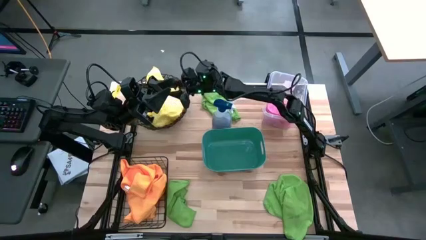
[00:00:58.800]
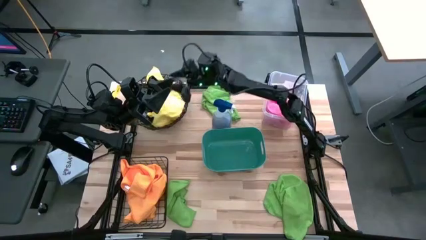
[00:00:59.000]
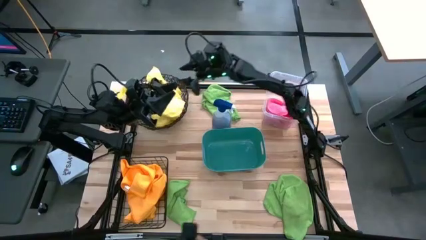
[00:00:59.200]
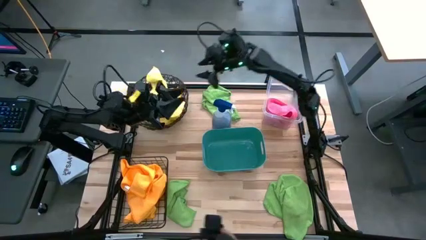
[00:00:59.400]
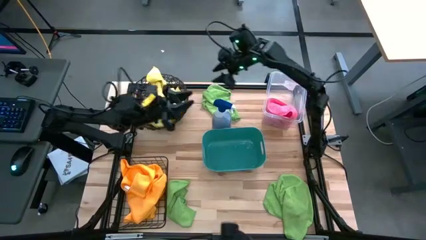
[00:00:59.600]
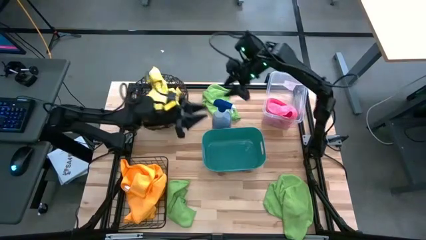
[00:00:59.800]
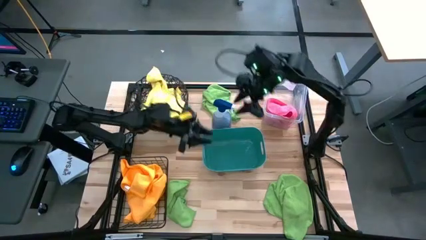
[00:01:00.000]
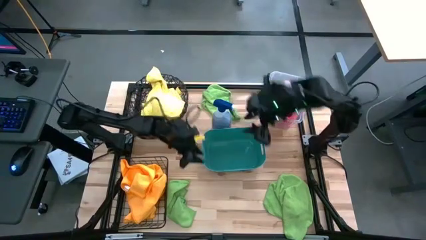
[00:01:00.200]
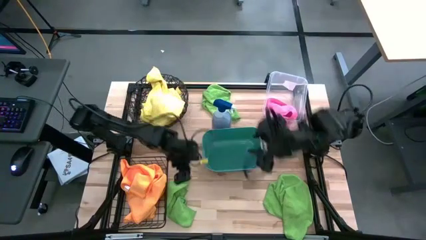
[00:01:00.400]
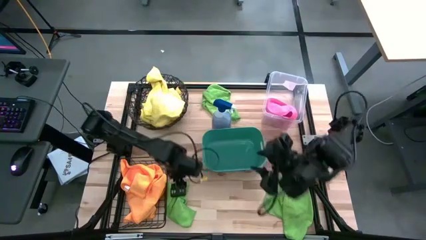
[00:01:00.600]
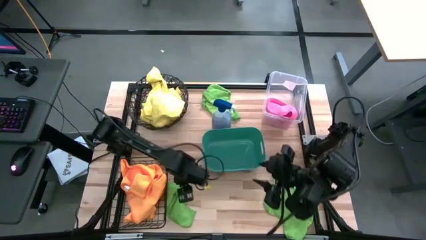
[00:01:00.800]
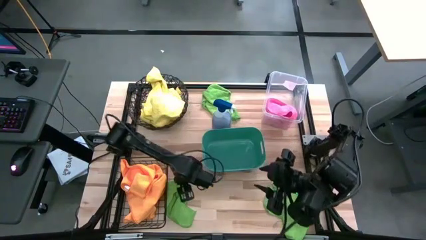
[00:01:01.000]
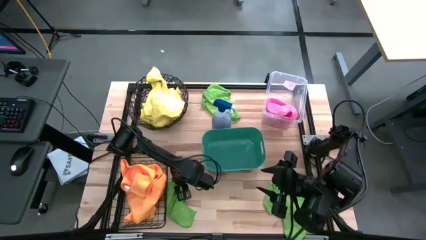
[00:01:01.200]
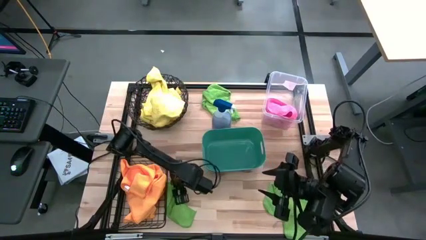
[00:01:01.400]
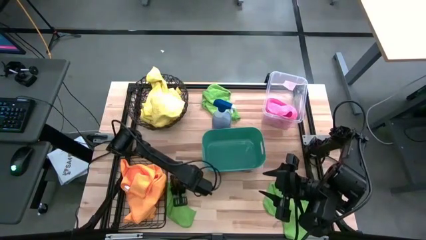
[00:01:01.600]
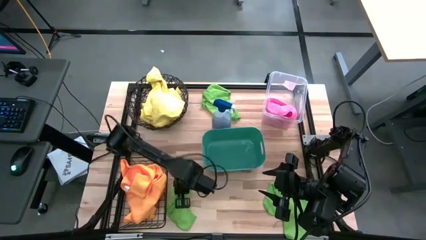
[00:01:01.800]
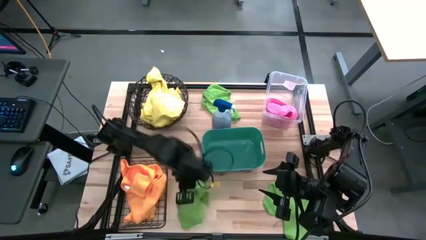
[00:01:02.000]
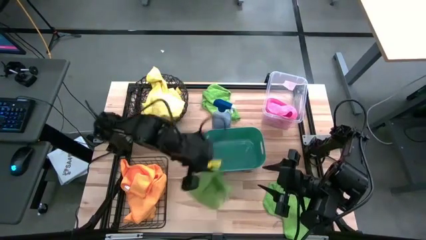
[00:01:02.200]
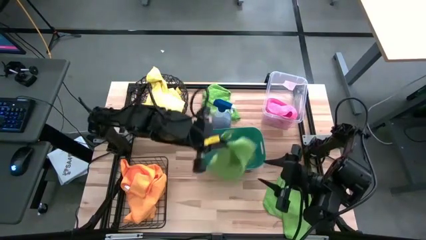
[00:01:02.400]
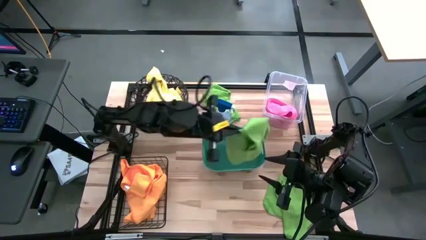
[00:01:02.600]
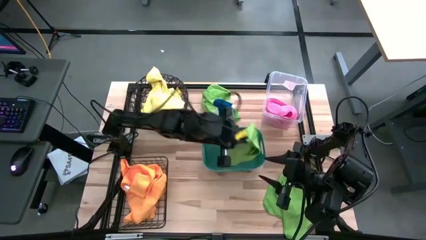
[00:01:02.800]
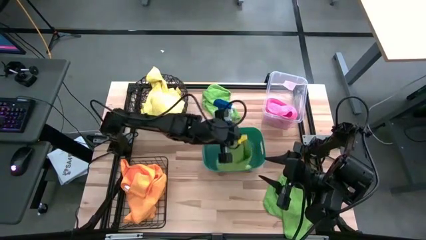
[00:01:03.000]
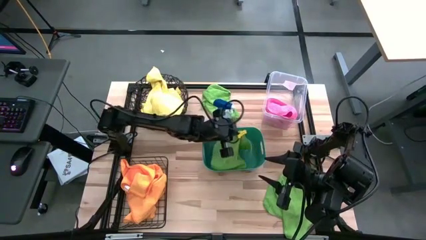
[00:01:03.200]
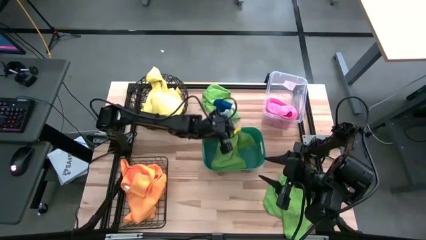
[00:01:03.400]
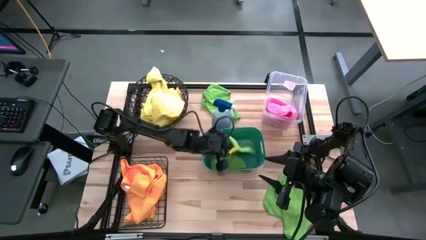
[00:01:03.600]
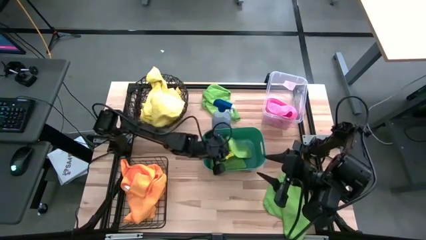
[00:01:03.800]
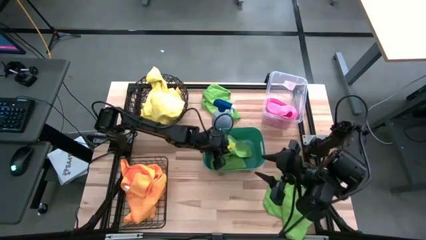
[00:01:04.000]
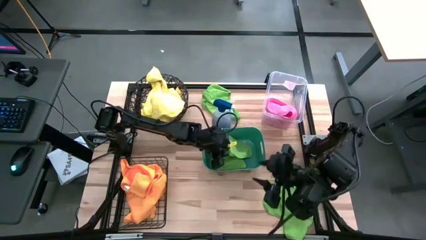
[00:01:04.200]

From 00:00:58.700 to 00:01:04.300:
Task: Sort microfiber towel by color & place in baskets
Put the bottom left green towel into the blue bin

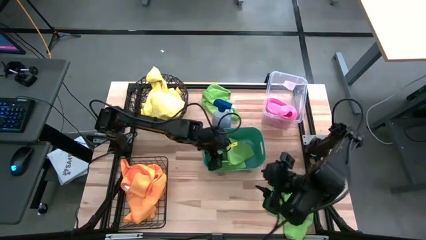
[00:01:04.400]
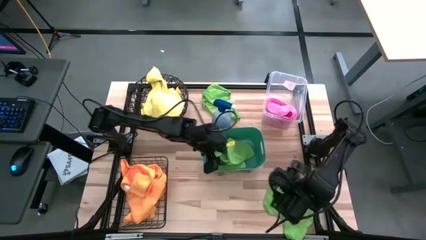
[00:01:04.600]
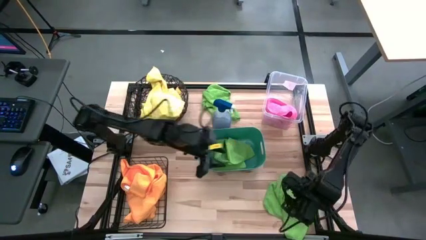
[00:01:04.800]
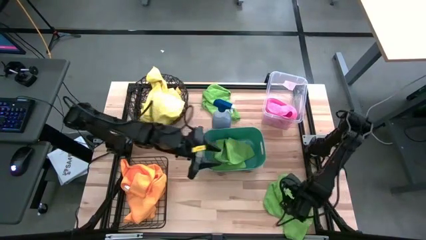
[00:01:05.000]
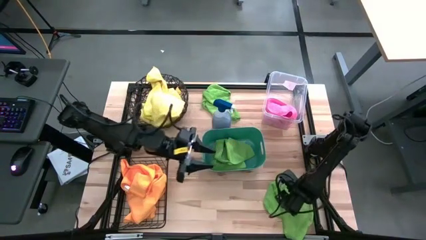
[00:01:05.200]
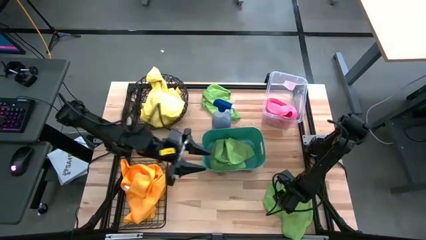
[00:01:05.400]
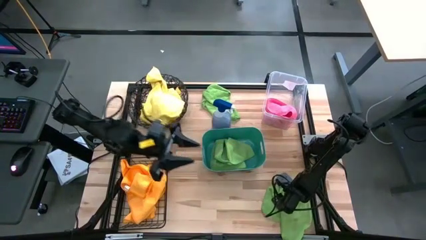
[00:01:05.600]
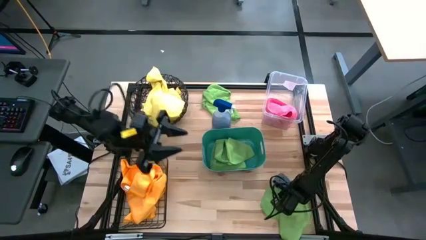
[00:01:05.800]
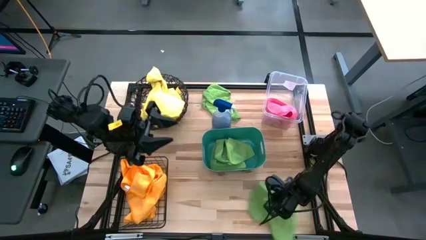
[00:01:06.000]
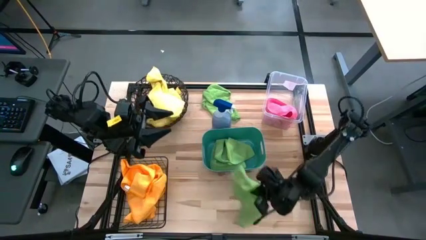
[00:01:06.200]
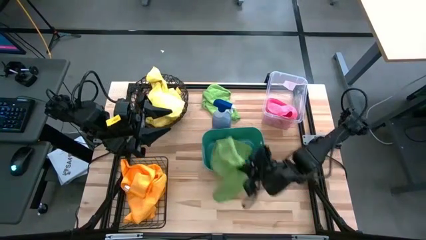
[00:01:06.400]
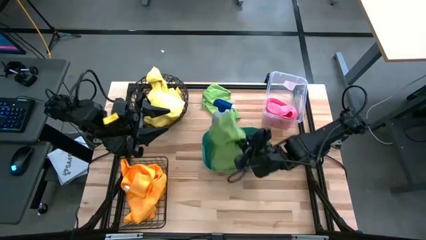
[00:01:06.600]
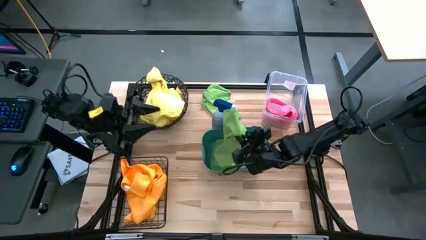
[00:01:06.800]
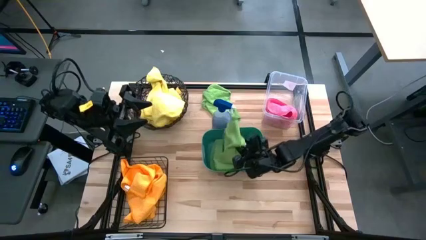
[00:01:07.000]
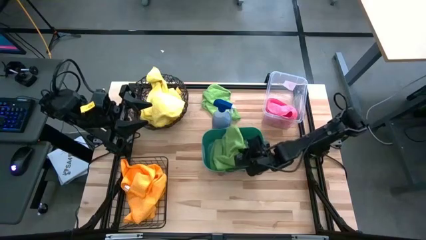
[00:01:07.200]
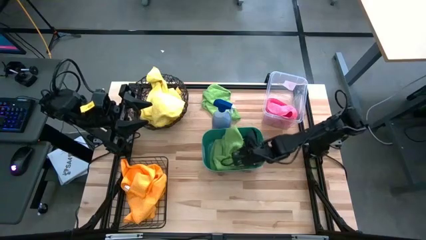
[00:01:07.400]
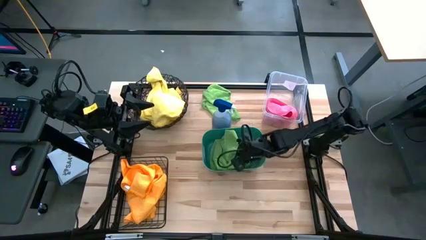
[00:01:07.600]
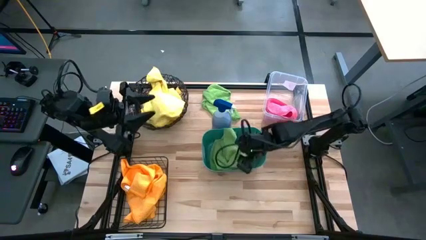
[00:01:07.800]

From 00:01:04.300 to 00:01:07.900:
Put the bottom green towel into the blue bin

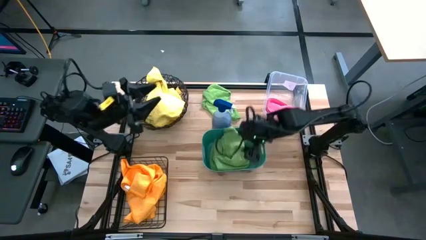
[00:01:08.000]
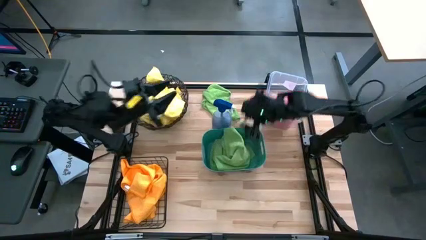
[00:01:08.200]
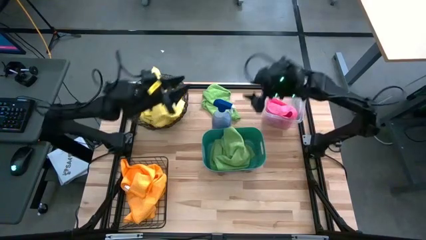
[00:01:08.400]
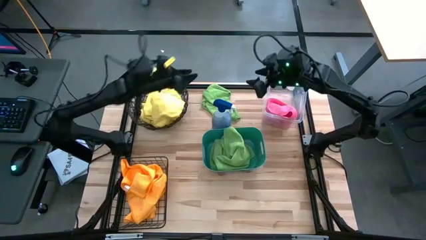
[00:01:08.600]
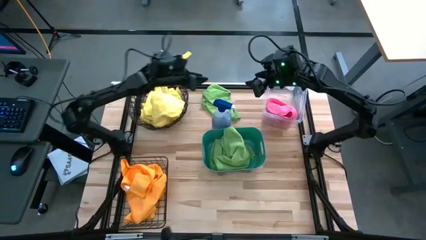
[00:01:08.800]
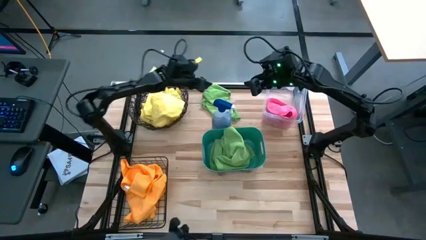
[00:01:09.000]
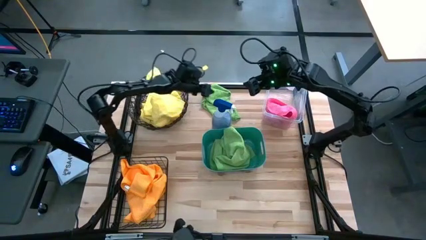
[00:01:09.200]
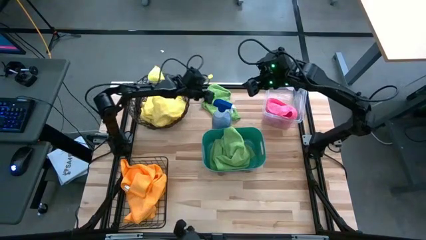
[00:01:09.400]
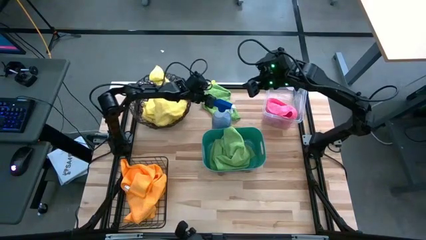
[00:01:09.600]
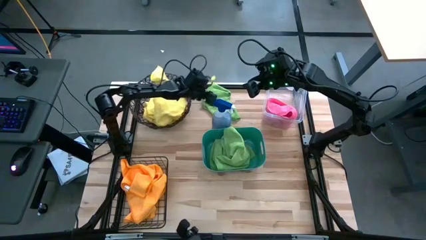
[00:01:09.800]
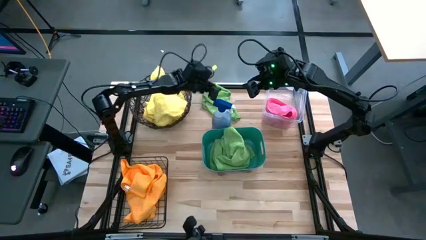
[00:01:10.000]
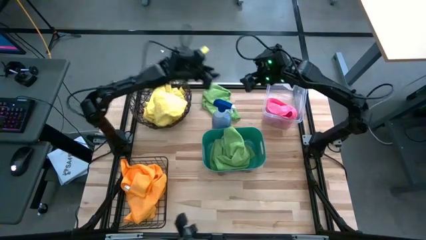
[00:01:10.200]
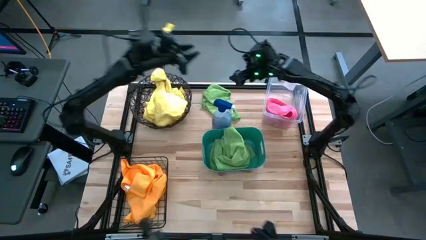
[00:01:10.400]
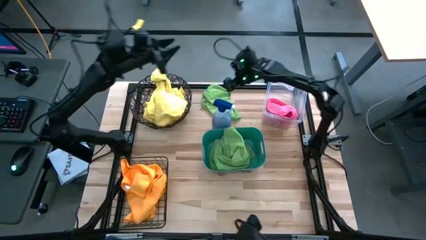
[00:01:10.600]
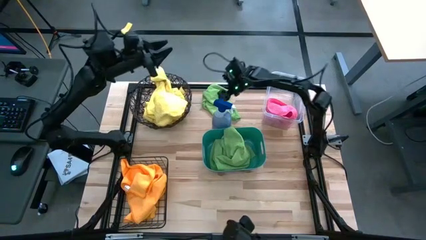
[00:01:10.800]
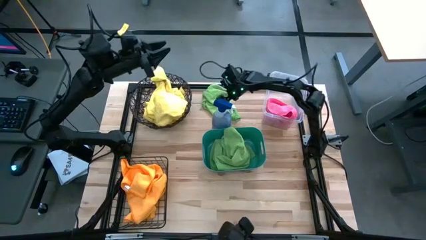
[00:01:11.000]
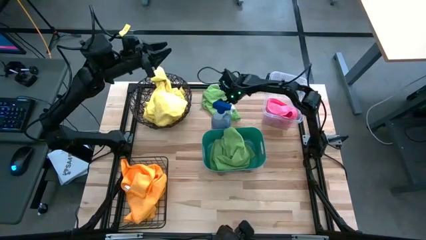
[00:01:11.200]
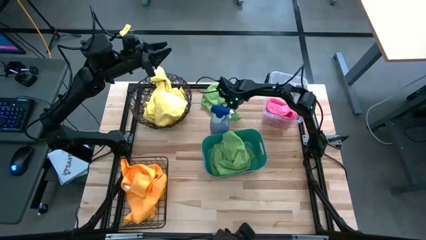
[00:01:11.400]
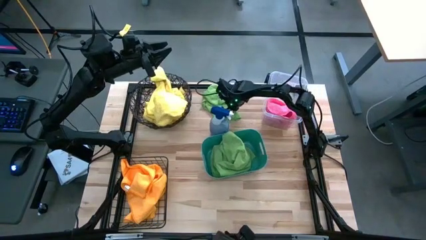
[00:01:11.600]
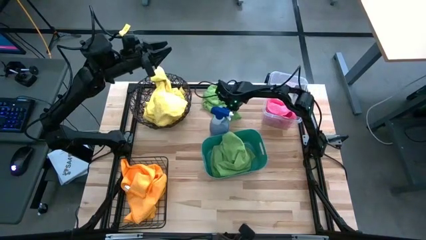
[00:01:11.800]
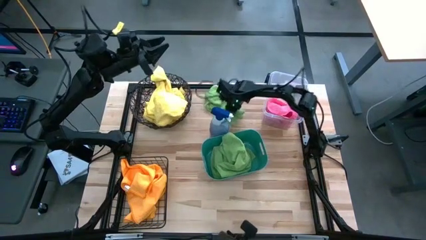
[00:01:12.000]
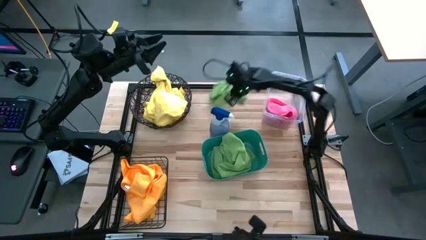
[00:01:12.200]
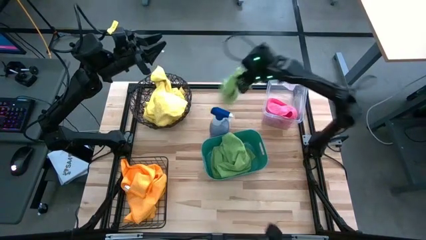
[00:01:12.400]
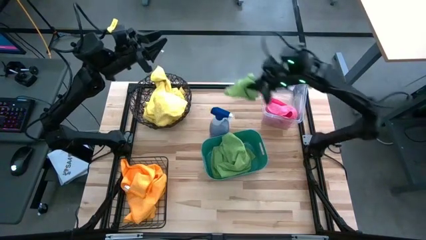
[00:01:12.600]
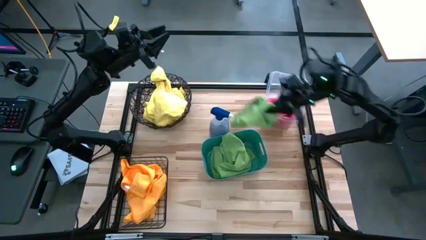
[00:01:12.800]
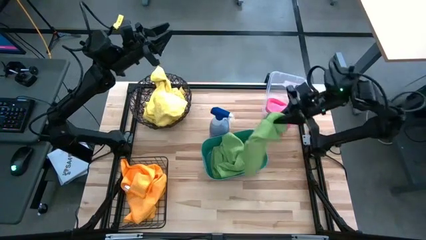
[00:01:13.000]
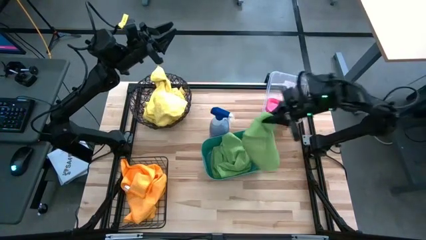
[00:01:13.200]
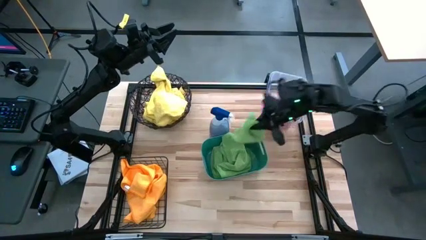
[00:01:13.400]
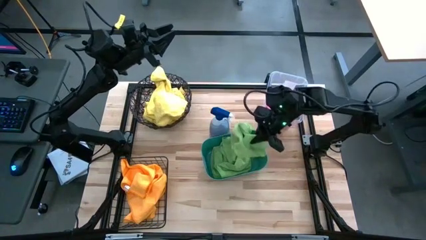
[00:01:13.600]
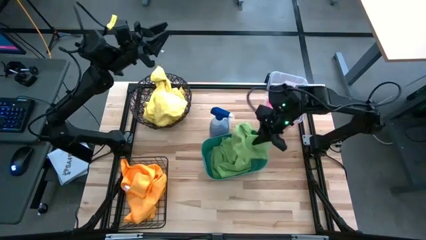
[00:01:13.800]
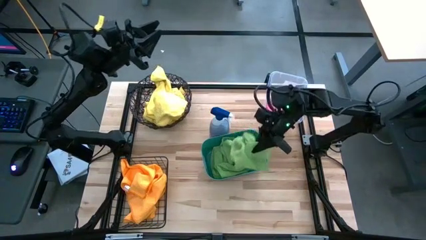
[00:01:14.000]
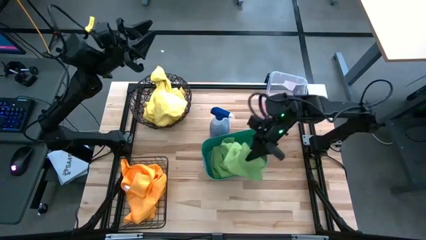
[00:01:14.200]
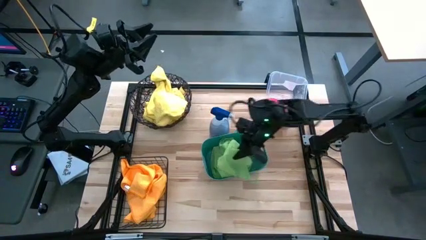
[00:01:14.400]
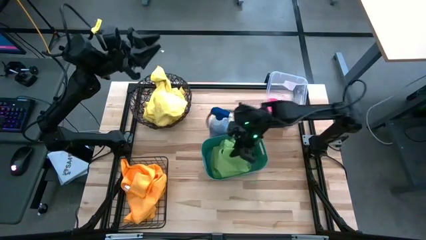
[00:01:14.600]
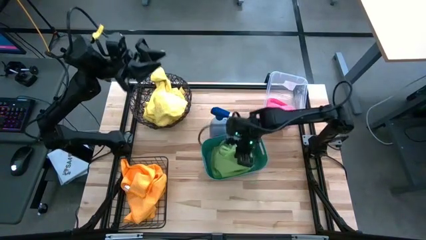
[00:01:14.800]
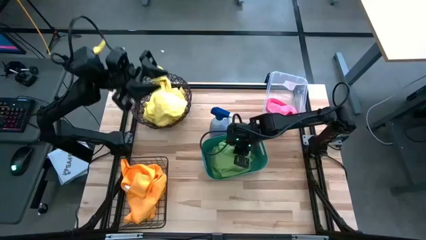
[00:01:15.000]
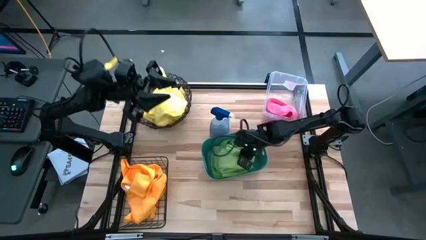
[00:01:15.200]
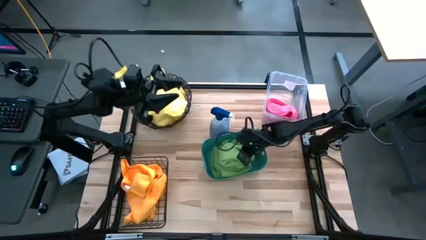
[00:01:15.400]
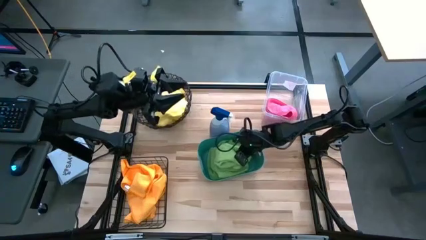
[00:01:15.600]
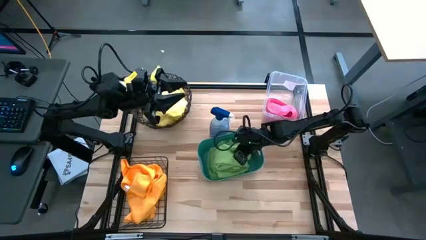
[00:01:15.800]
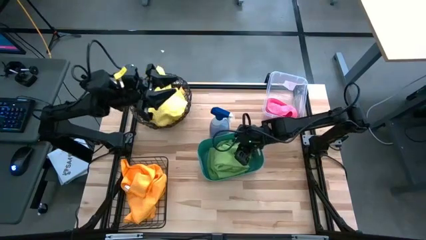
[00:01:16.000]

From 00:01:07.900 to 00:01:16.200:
Put the green towel into the blue bin
